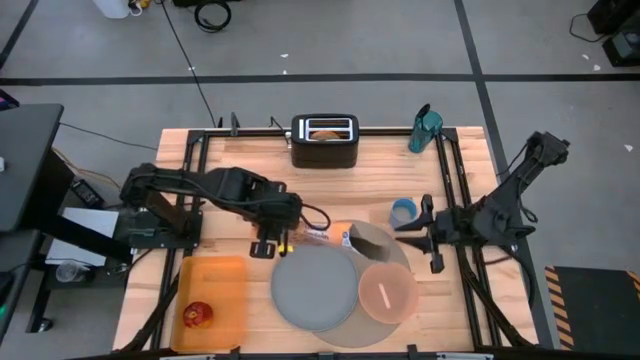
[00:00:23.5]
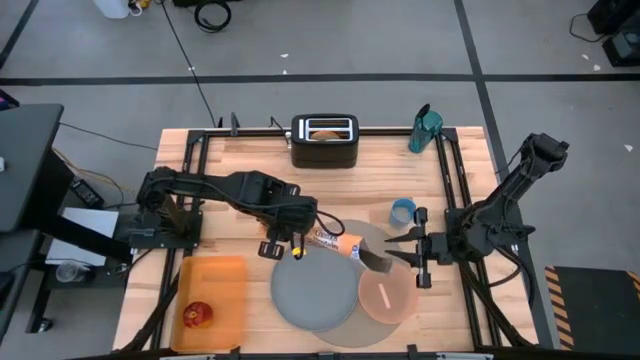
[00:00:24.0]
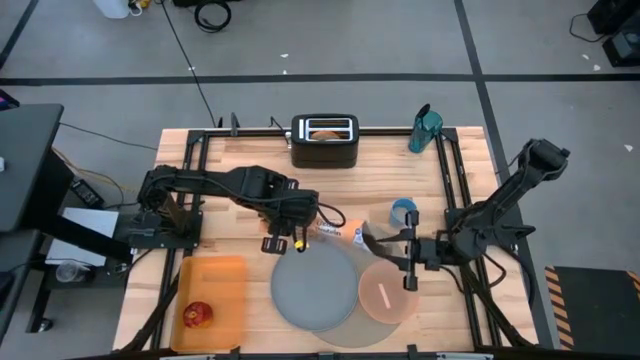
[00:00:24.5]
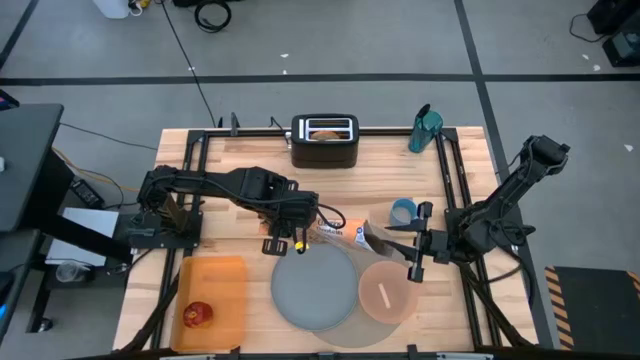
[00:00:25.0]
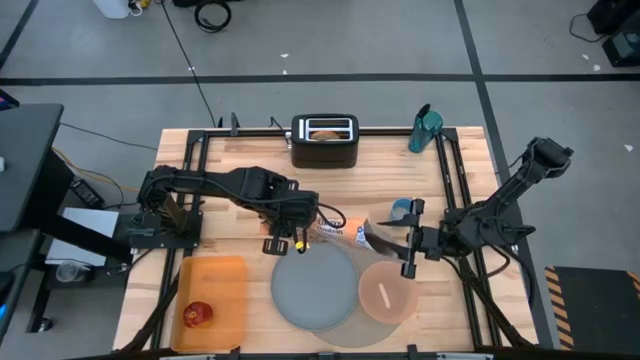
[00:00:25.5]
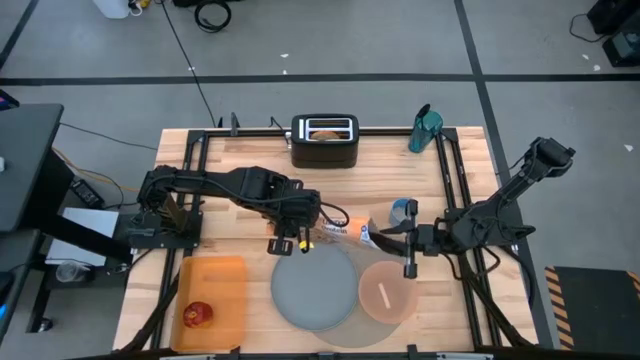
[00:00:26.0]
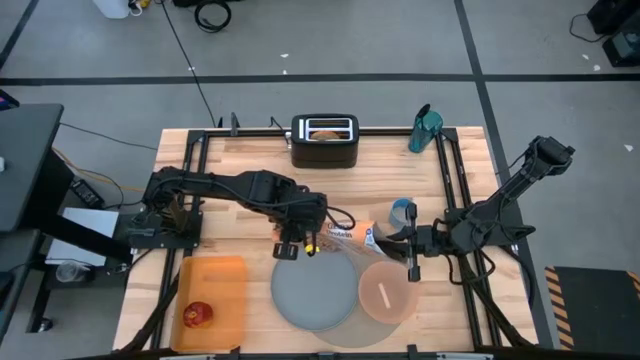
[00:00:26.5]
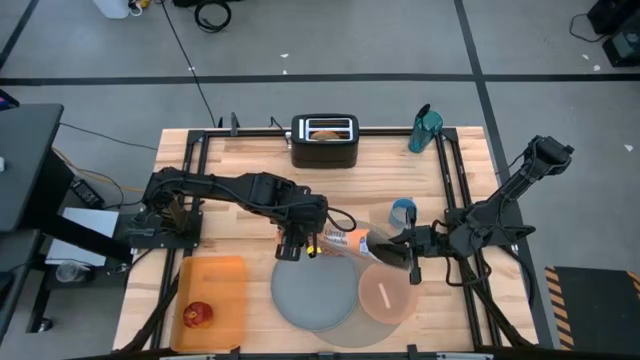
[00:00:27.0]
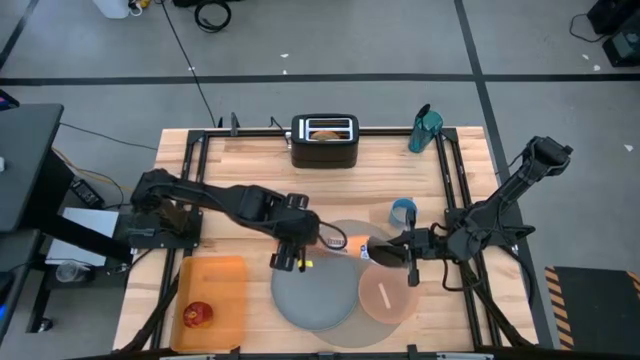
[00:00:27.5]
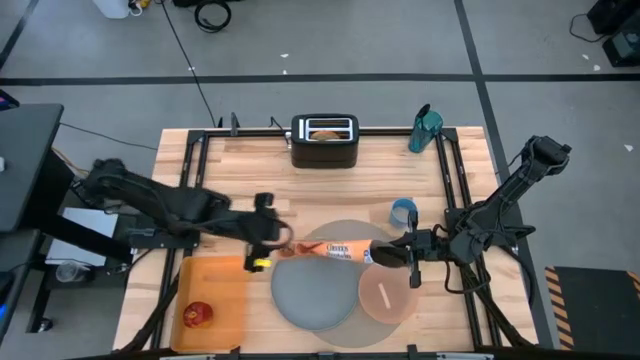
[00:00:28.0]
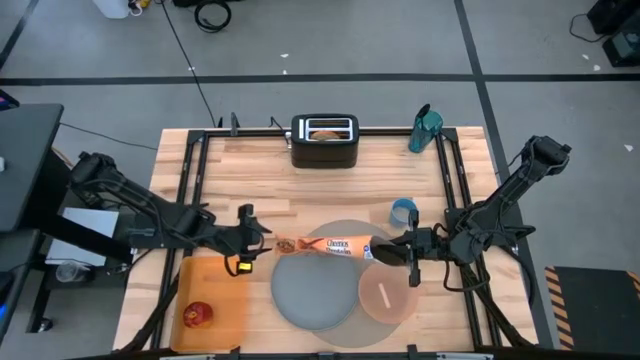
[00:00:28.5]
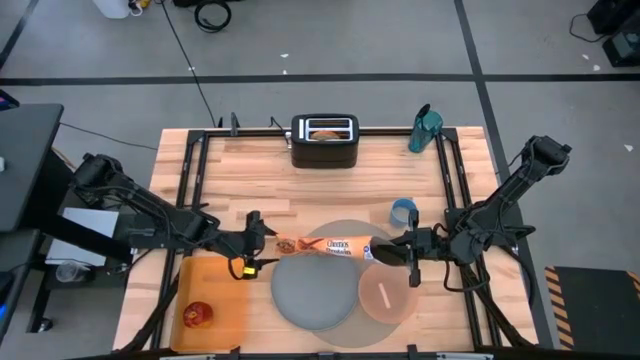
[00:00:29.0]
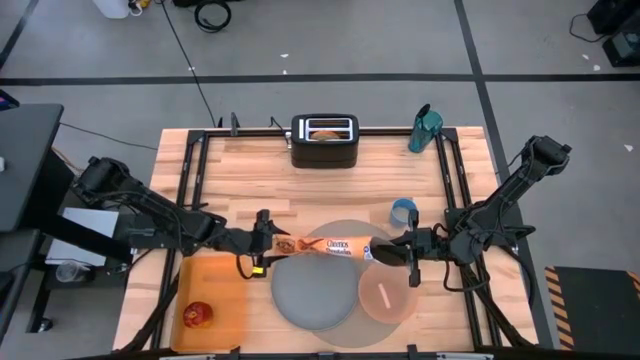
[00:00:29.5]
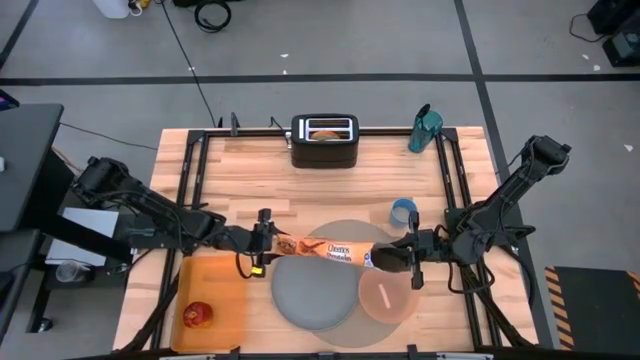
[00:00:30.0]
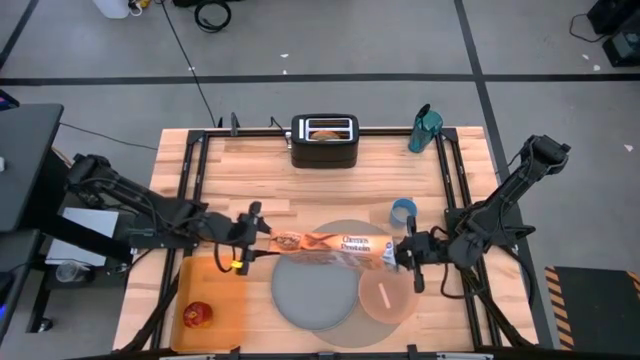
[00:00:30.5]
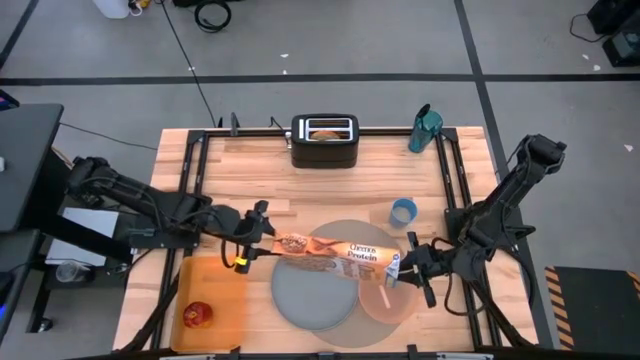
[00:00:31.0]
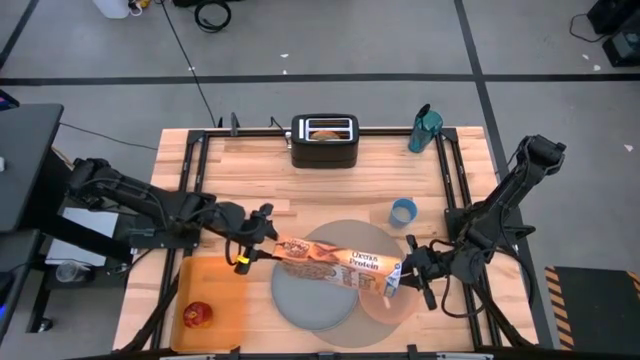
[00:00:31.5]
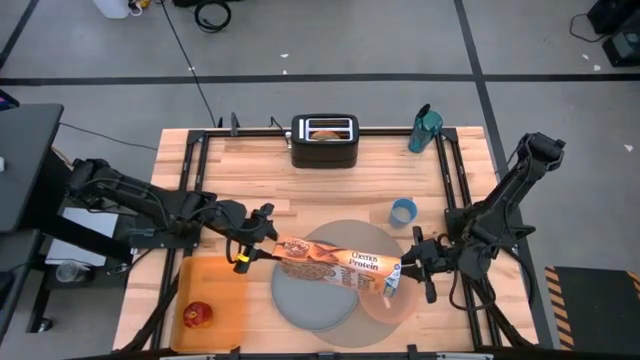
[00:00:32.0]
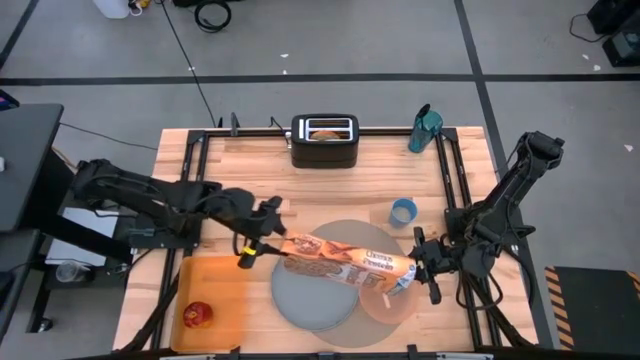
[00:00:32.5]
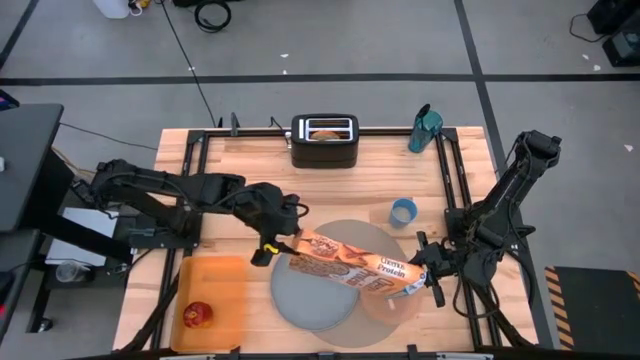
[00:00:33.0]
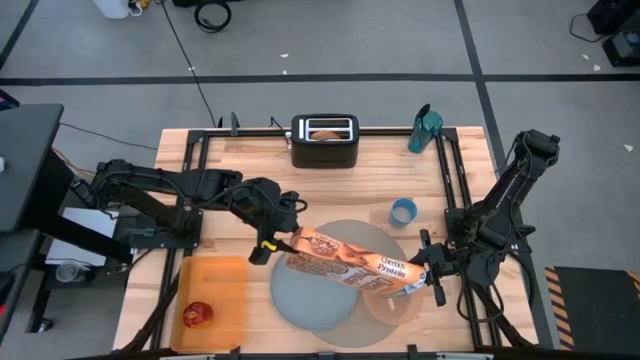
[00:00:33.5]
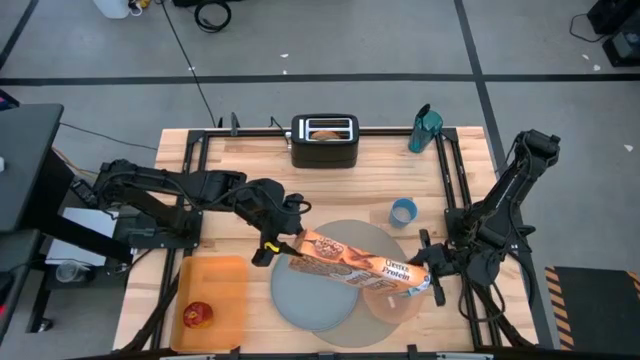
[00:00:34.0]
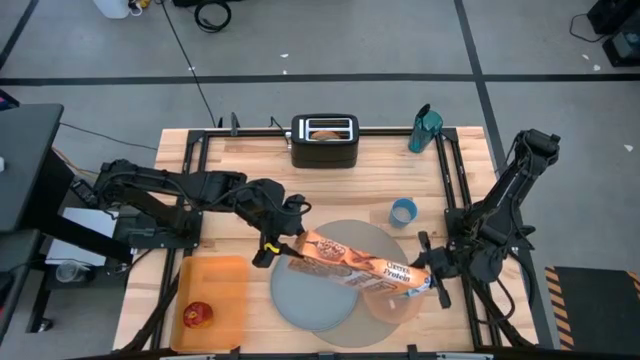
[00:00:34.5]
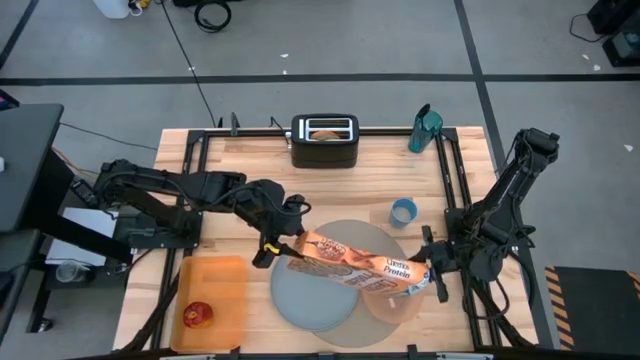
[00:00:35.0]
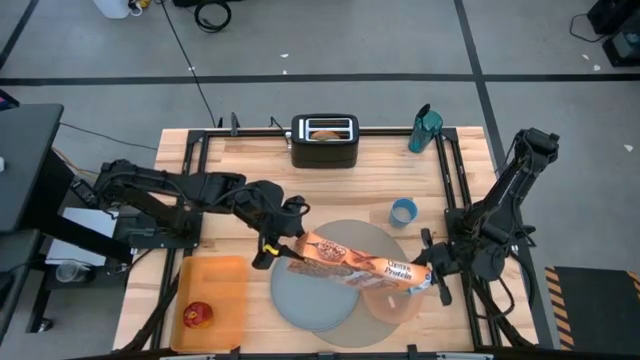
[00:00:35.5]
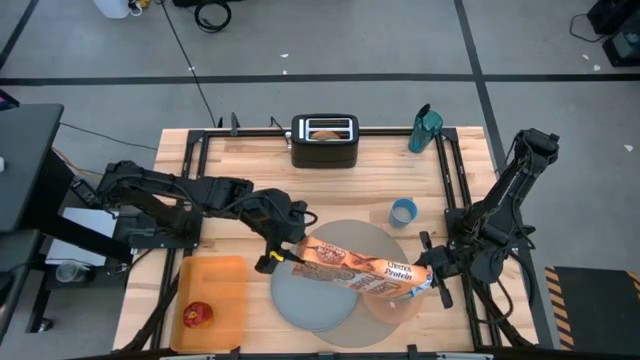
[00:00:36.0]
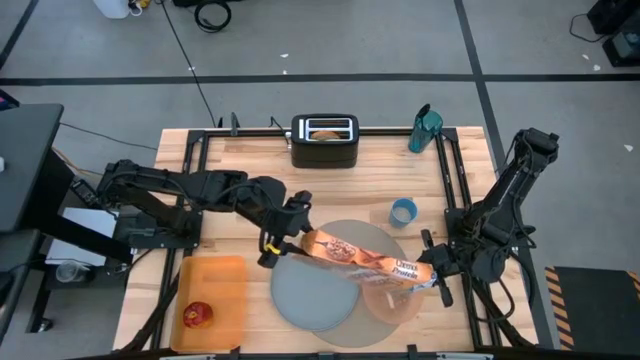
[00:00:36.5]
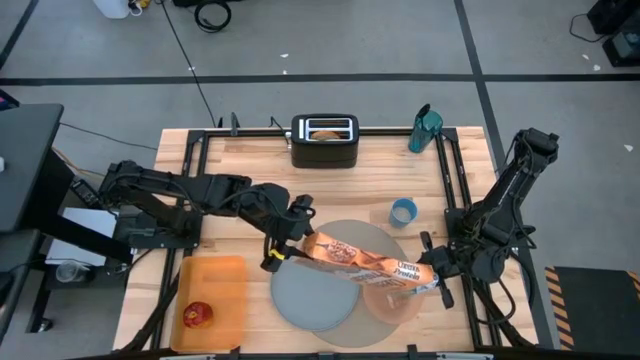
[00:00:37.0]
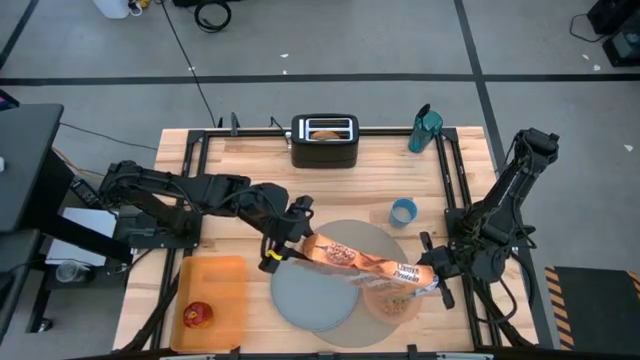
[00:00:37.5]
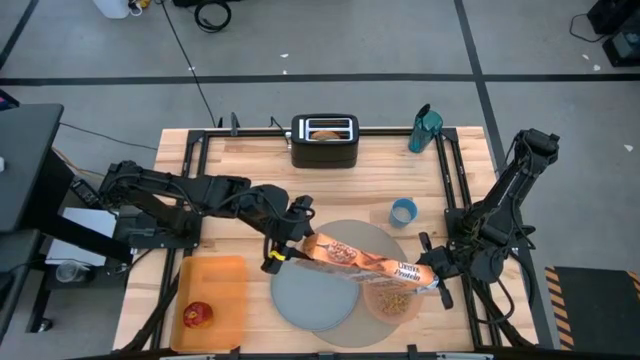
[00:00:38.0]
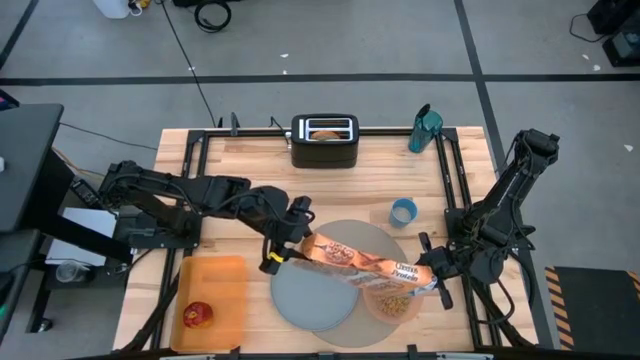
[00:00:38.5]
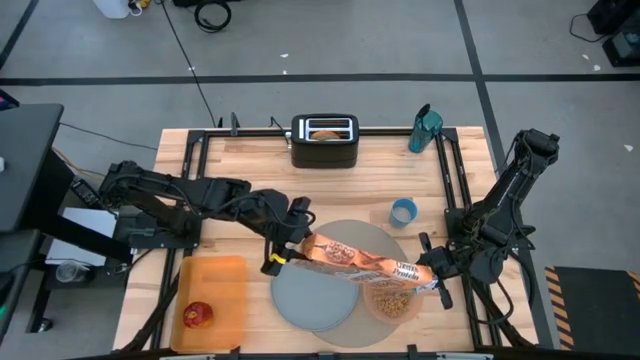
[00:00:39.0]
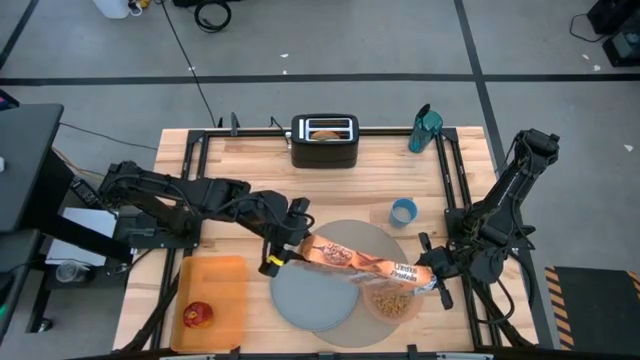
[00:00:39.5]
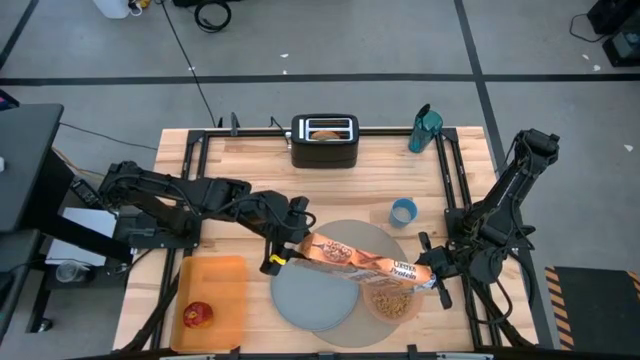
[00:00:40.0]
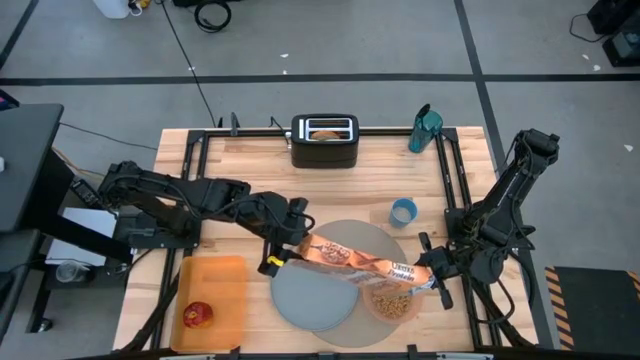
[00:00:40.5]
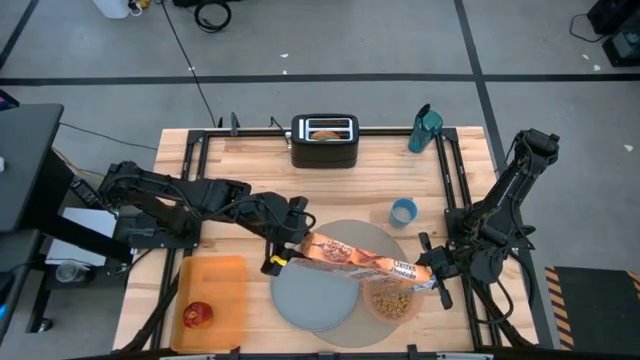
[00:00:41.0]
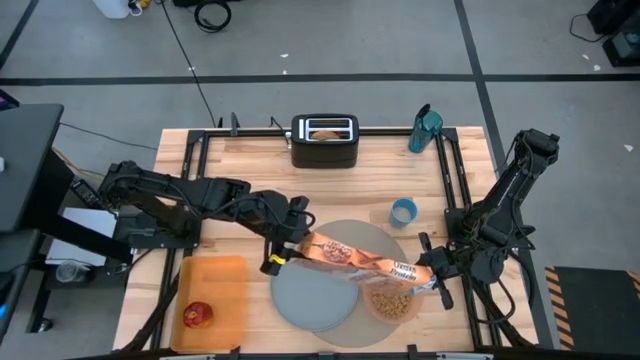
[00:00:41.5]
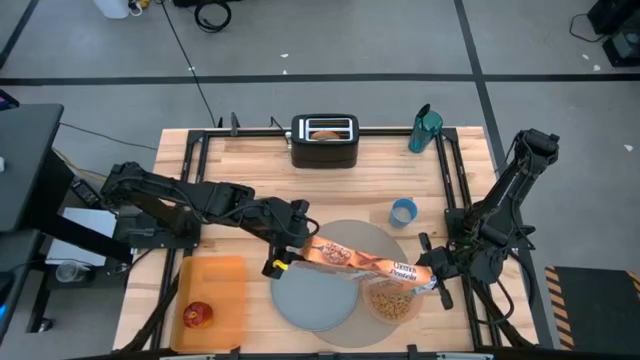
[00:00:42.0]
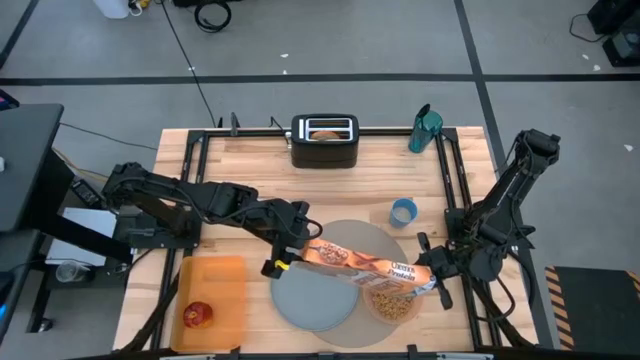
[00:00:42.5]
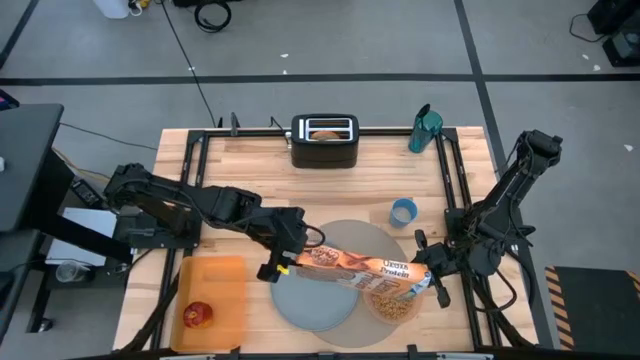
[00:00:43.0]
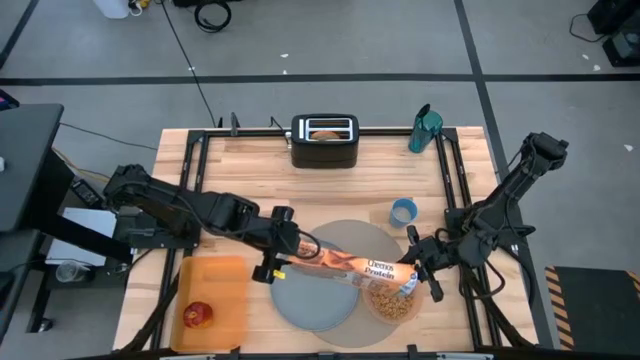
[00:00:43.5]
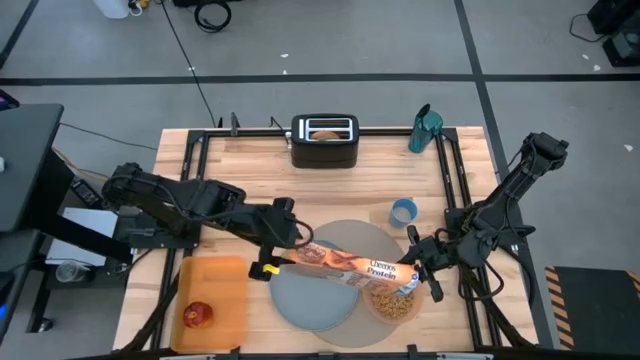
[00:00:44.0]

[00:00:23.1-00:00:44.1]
Task: Arrange a breakfast setting
Pour the cereal from the cereal box into the pink bowl
